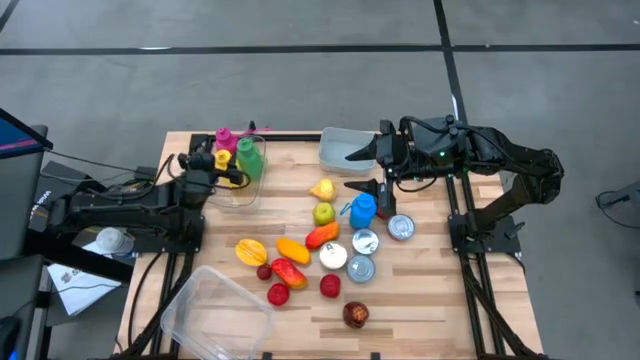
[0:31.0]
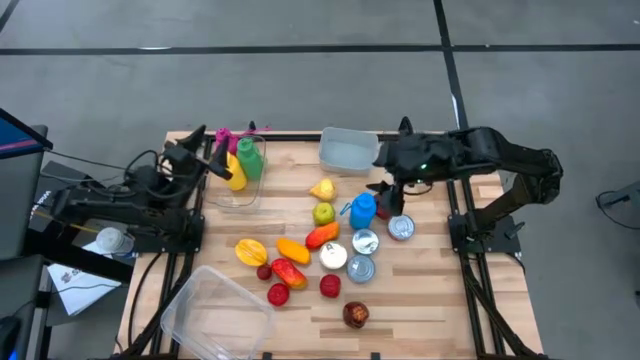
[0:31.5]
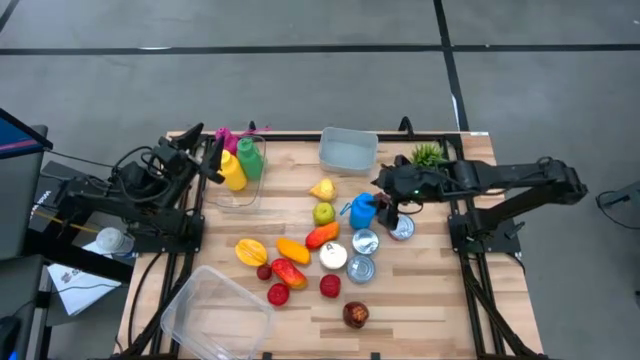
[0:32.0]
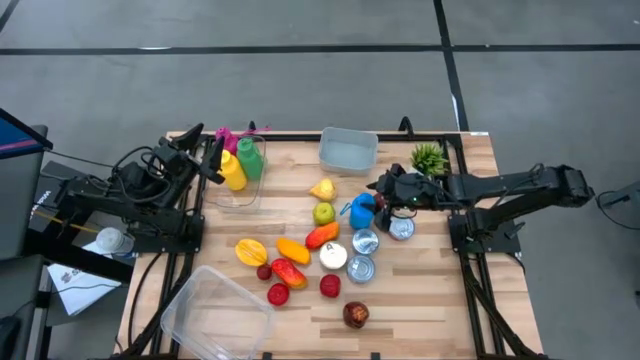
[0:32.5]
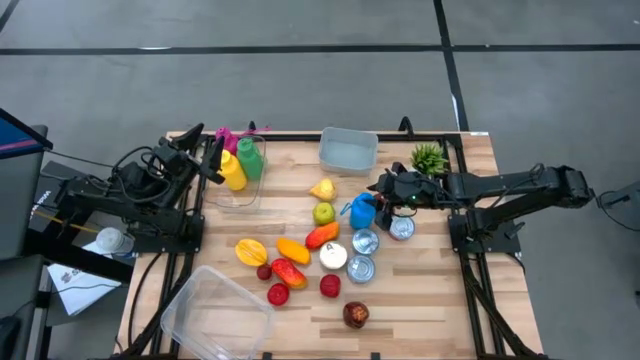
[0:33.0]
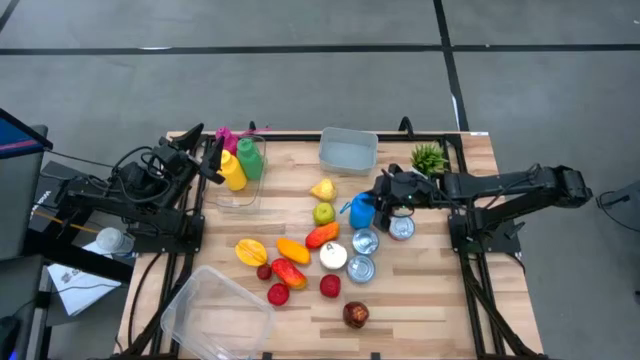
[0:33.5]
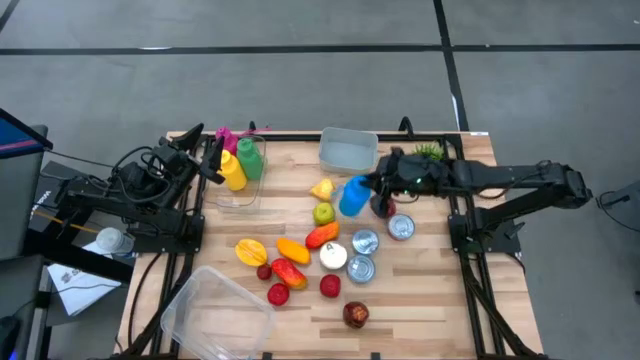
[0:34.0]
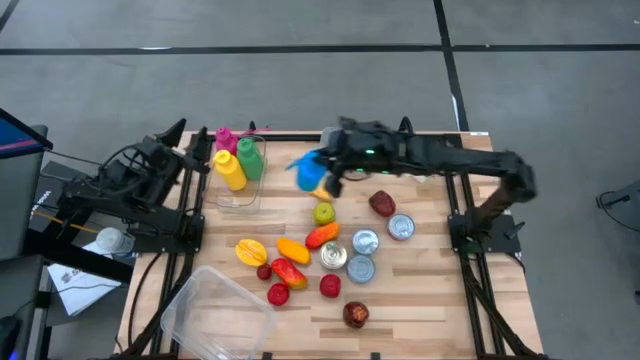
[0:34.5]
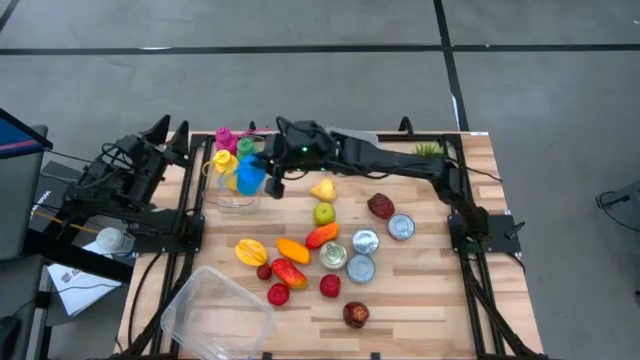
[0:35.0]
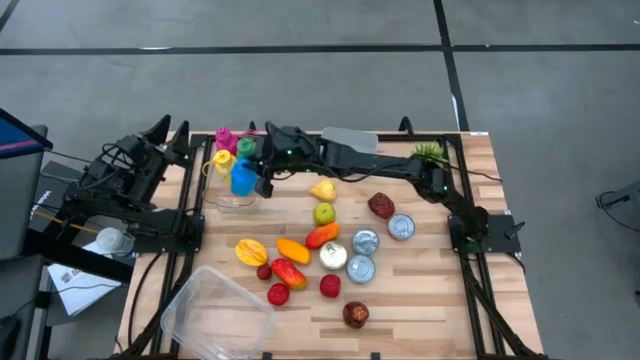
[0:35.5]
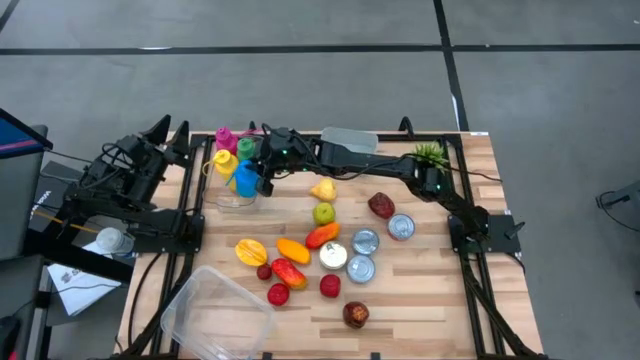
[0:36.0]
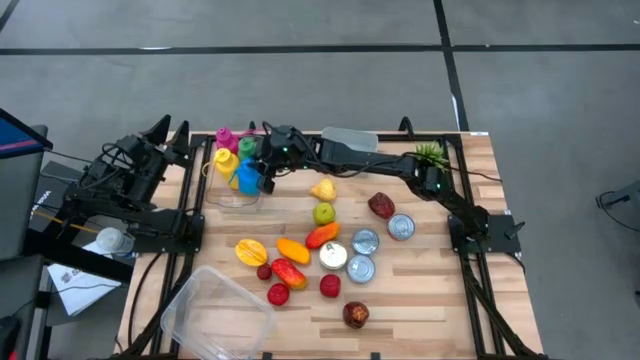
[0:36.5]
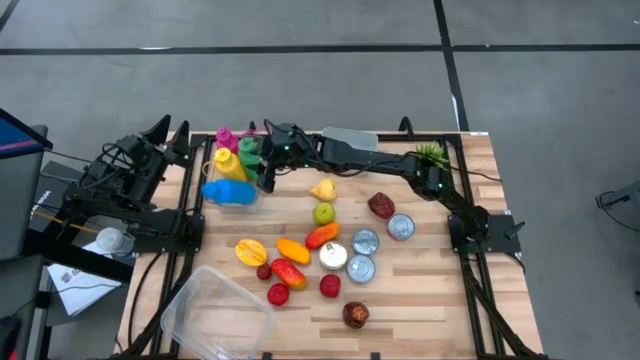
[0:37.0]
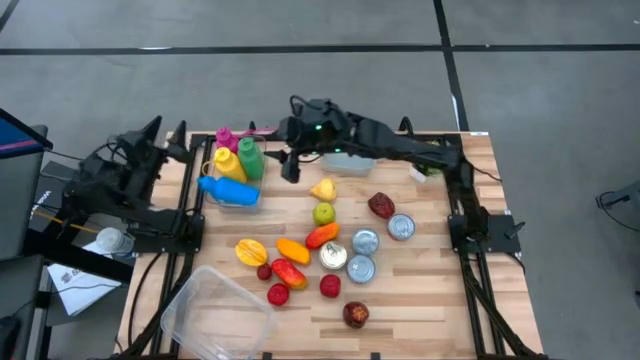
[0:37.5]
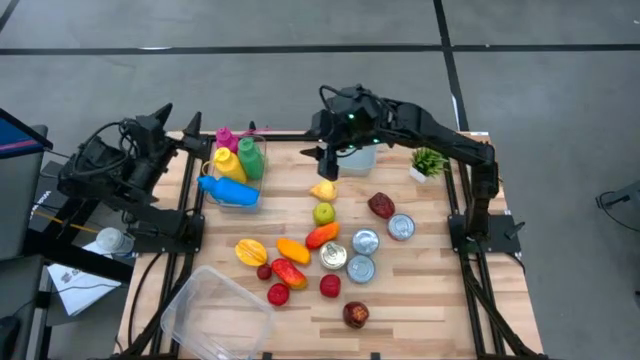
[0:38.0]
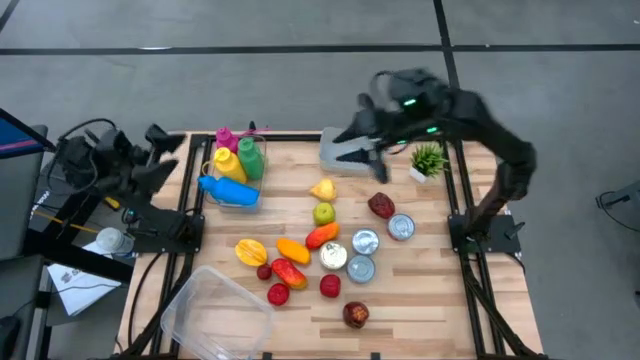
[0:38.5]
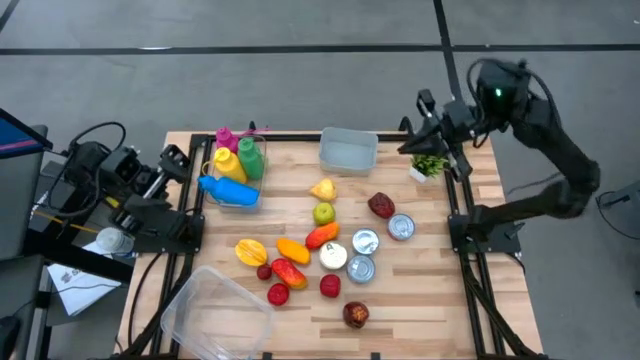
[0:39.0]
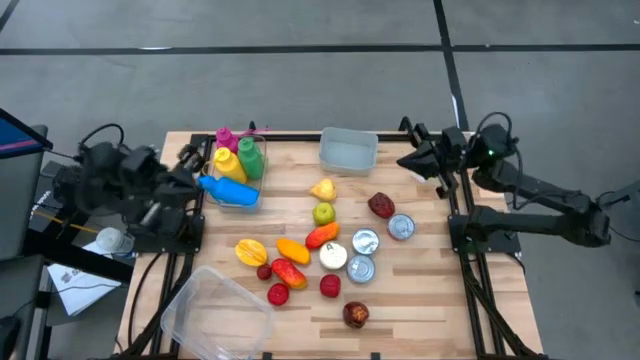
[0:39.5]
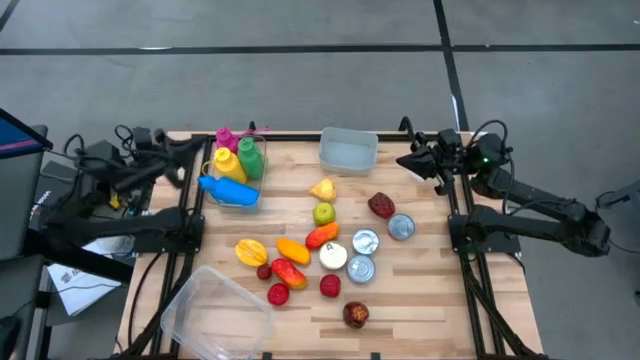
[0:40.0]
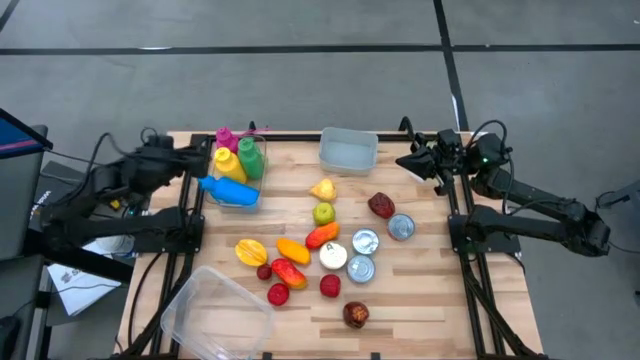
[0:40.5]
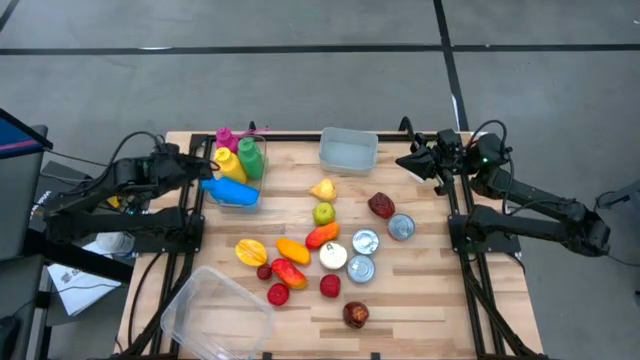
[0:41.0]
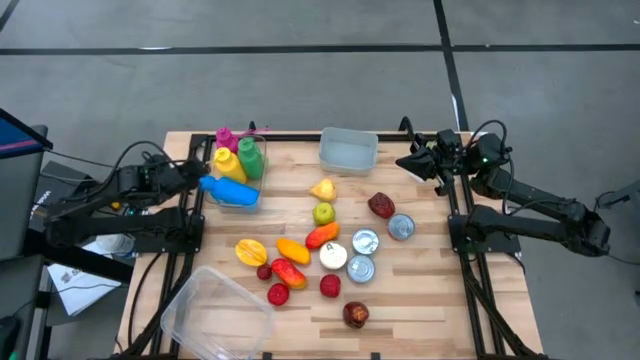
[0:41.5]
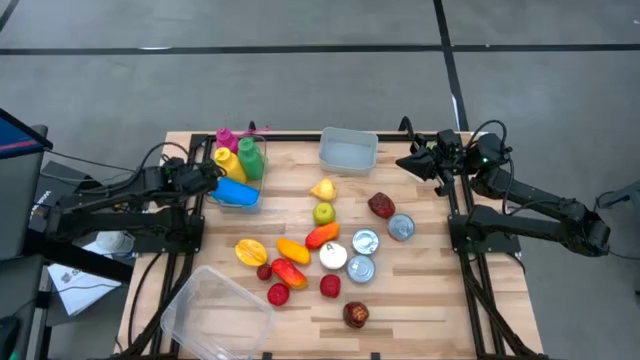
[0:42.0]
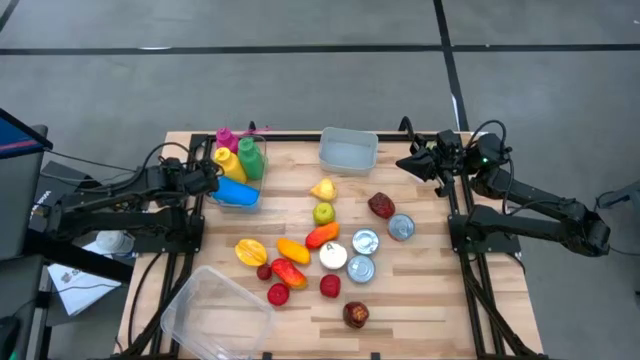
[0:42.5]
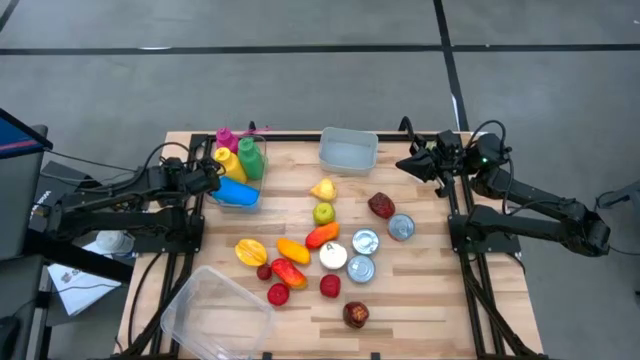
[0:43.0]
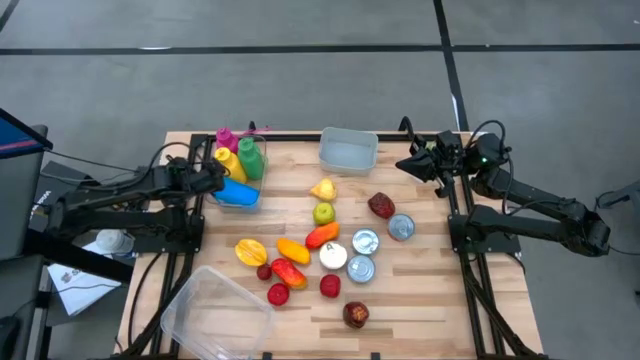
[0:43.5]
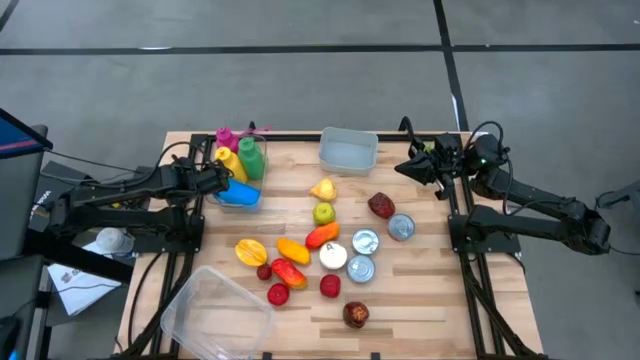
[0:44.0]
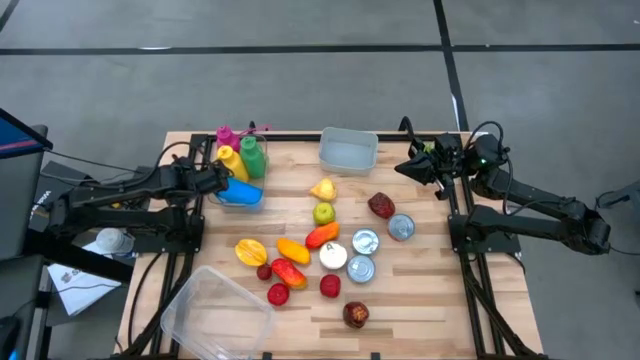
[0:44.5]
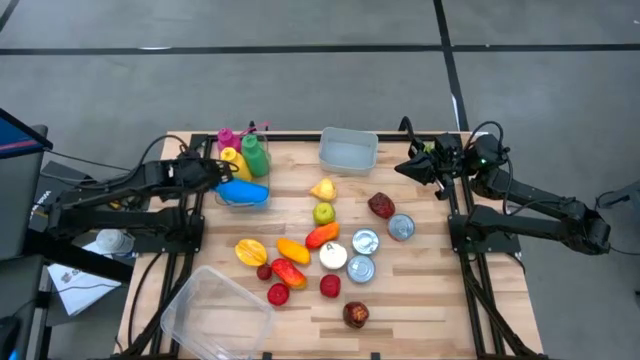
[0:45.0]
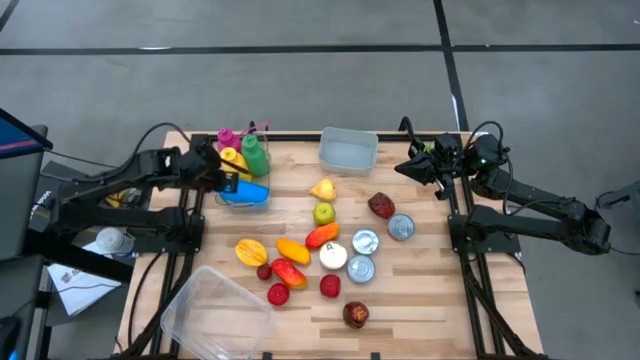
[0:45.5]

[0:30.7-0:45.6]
Task: Pick & Place Food Item
Put the blue water bottle into the transparent bin

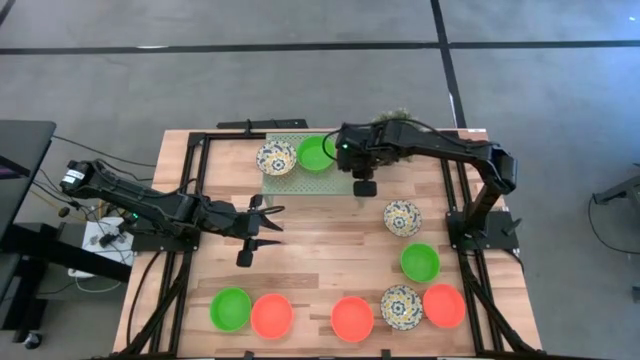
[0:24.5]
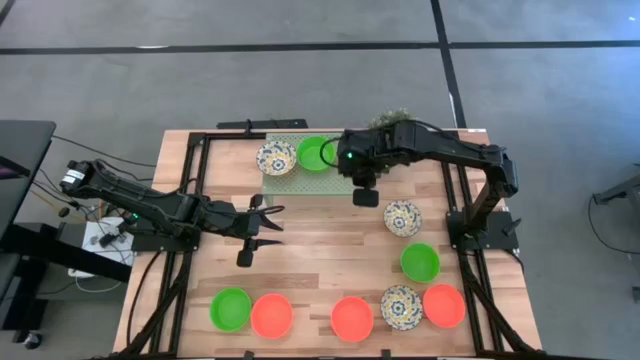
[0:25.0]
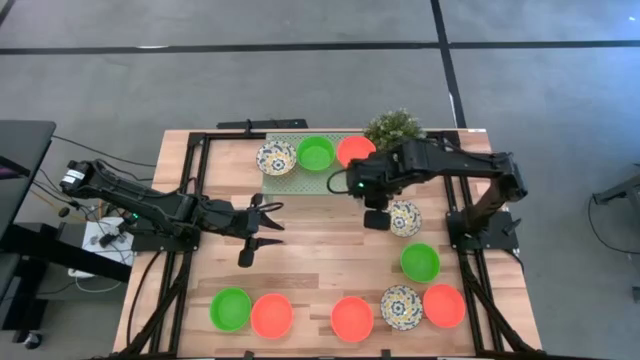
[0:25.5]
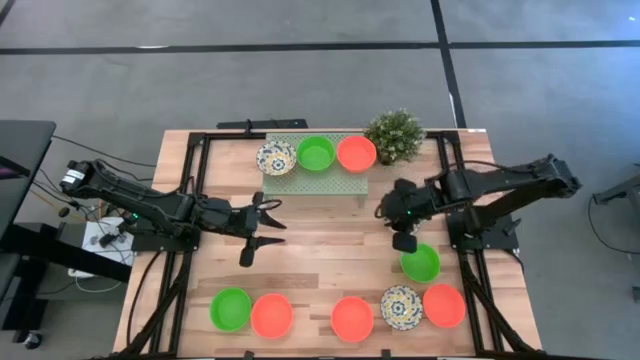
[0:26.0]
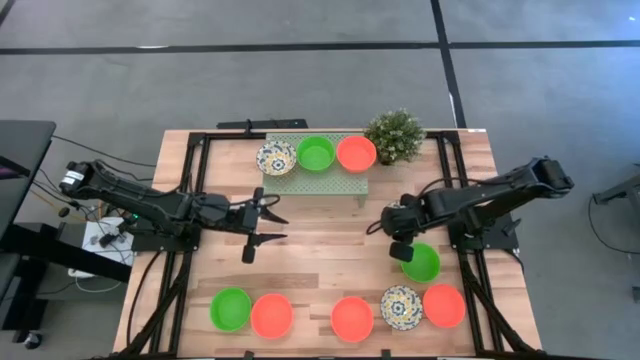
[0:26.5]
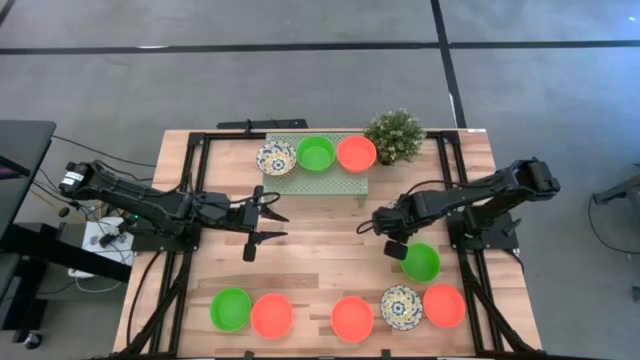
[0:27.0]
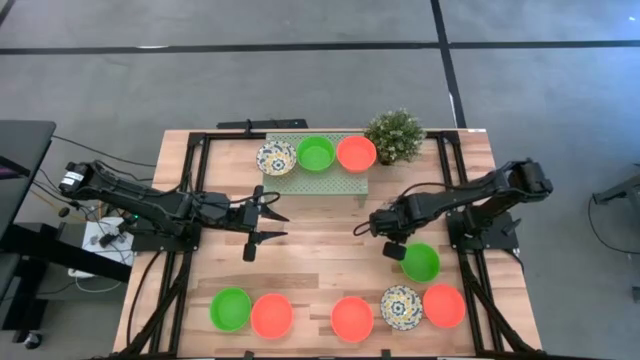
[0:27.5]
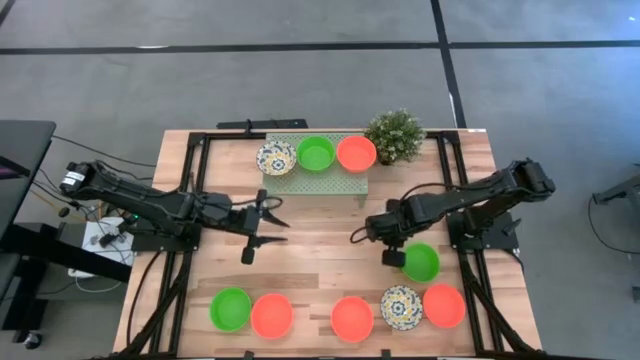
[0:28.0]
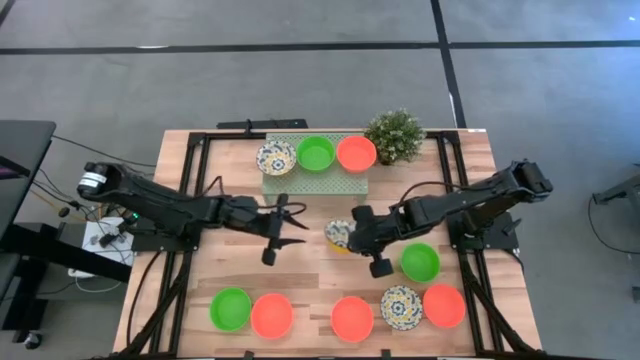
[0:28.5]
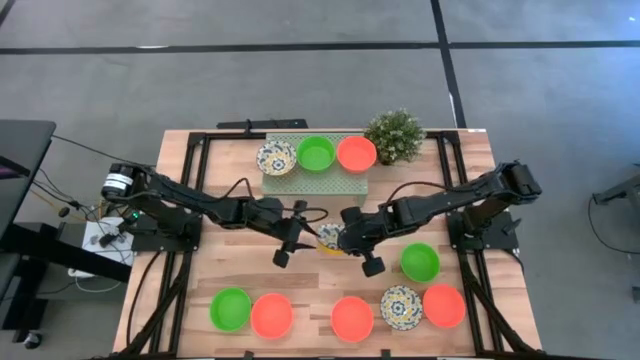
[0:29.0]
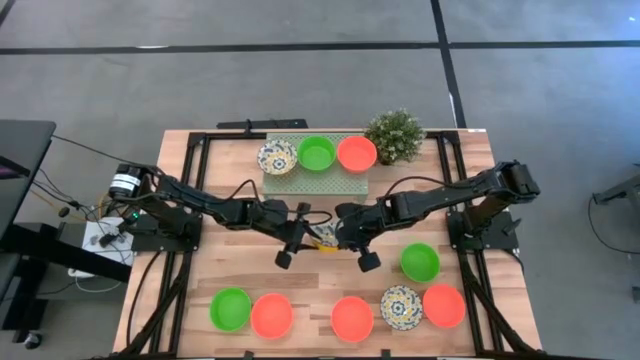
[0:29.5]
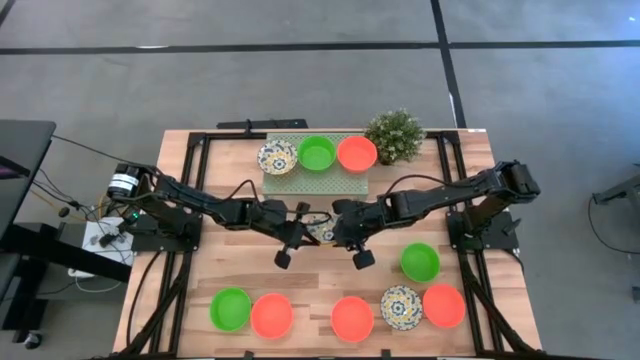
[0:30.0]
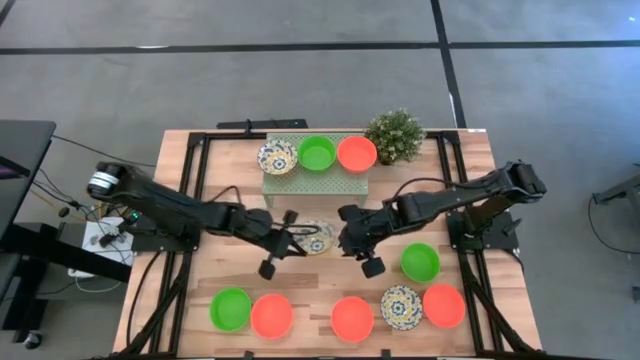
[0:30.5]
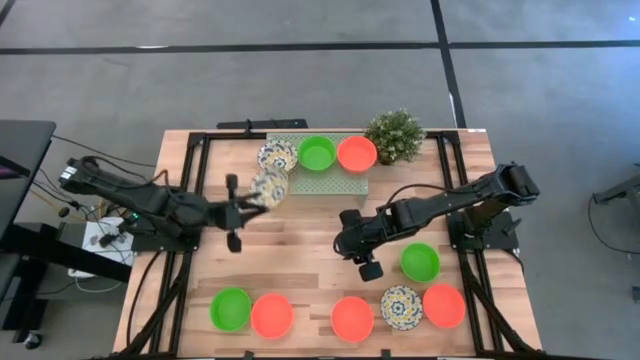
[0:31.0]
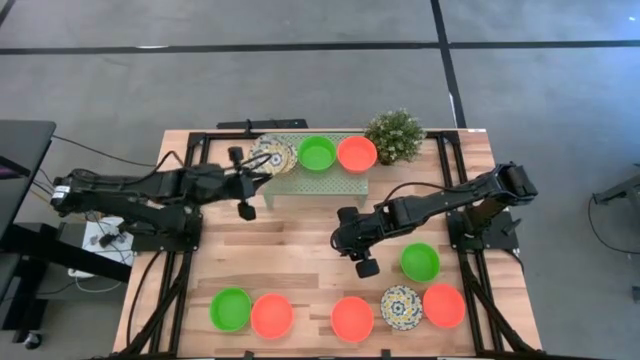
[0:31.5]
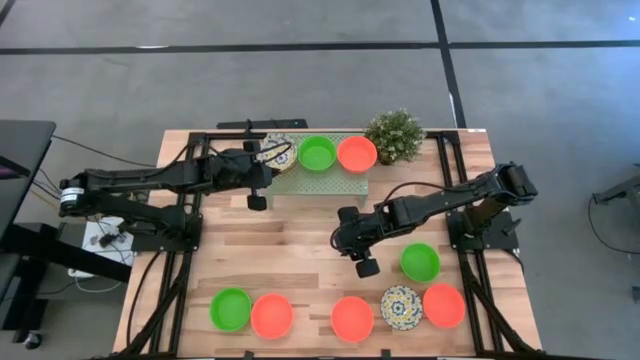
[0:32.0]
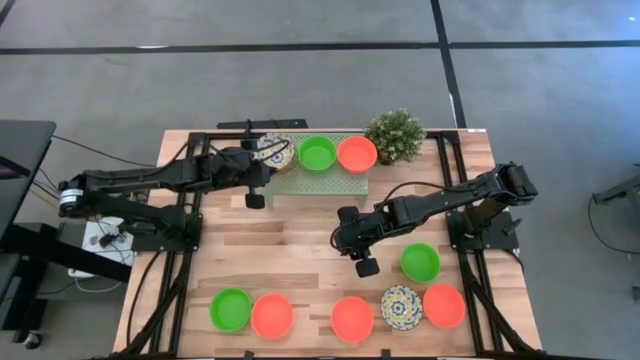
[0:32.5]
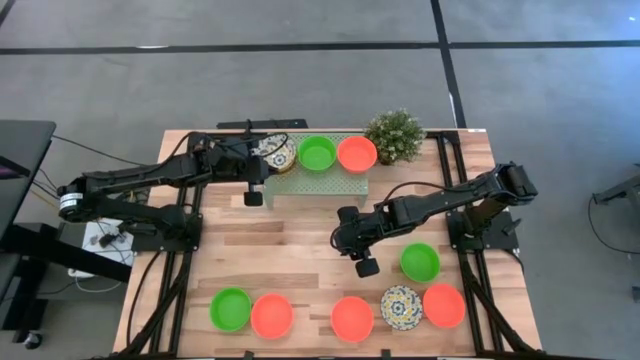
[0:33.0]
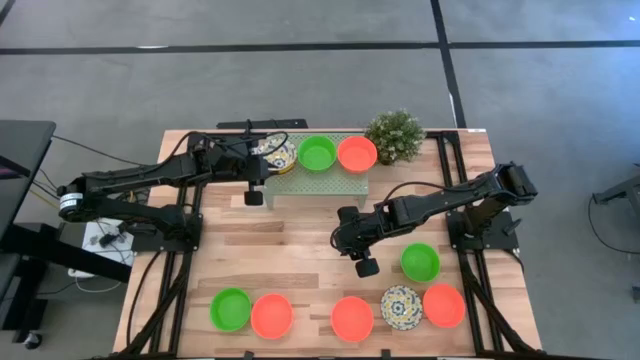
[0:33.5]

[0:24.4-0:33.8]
Task: Pick & Place Mini bowls
Stack the white patterned bowl on the white patterned bowl on the shelf
